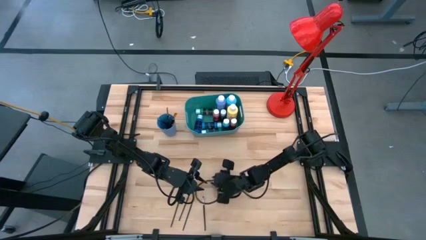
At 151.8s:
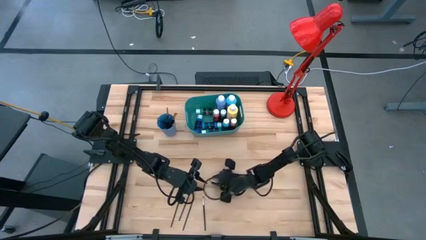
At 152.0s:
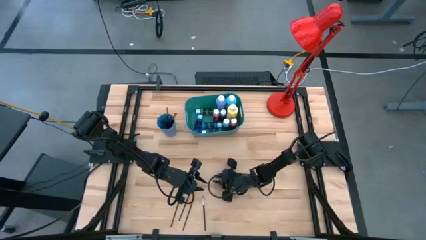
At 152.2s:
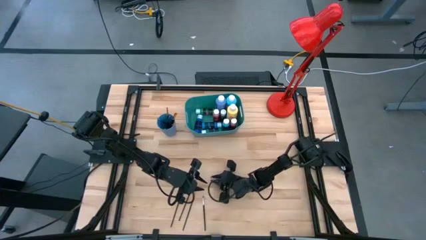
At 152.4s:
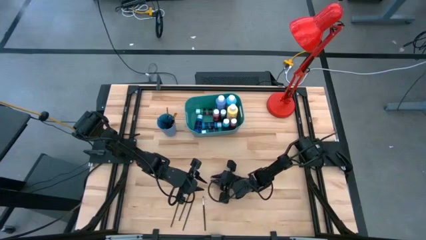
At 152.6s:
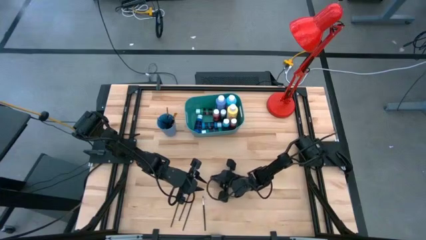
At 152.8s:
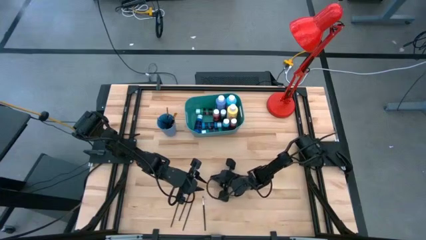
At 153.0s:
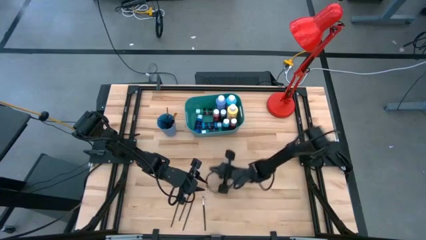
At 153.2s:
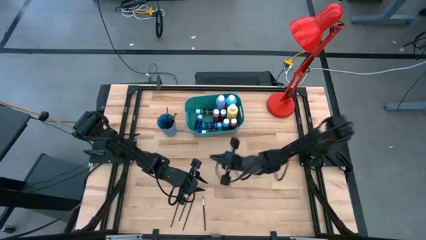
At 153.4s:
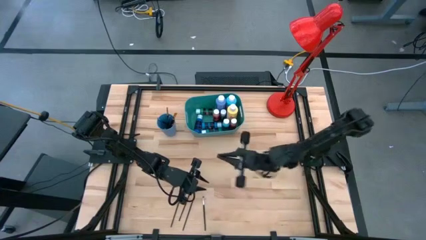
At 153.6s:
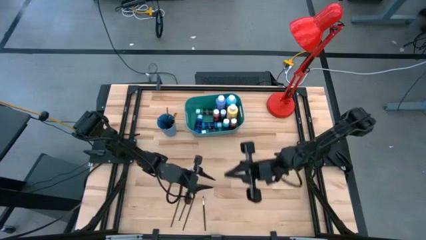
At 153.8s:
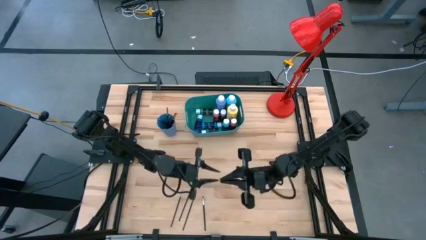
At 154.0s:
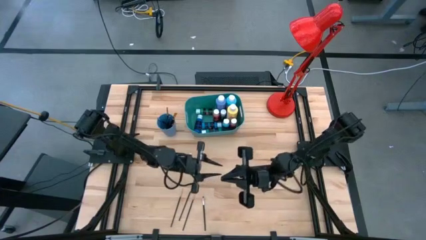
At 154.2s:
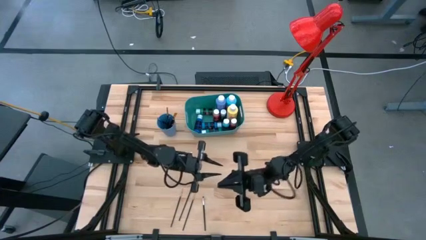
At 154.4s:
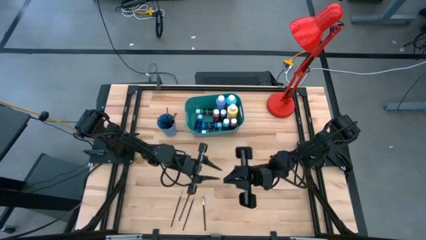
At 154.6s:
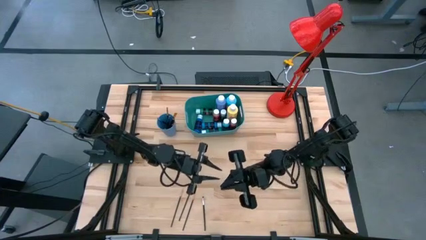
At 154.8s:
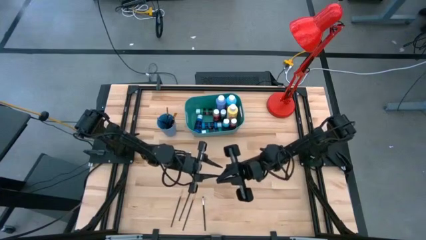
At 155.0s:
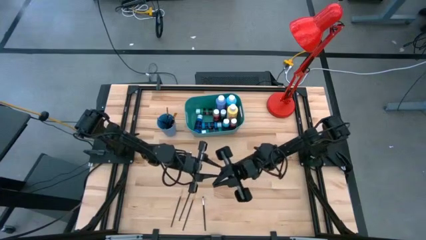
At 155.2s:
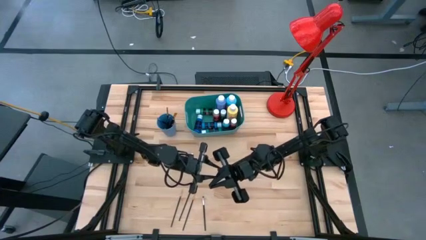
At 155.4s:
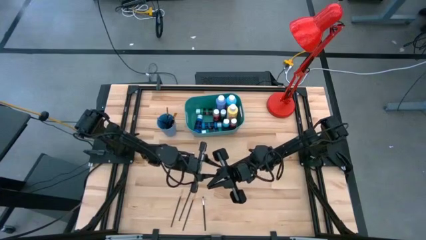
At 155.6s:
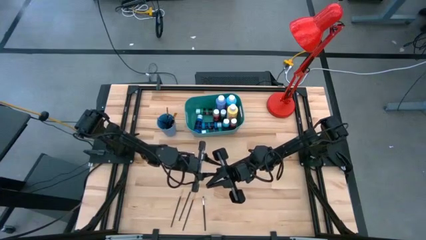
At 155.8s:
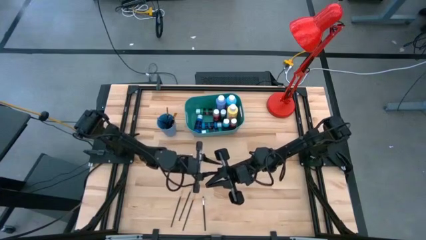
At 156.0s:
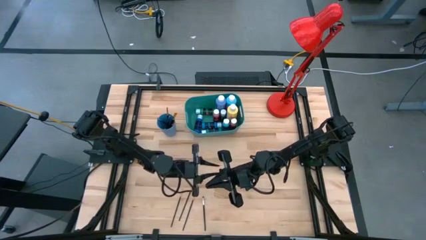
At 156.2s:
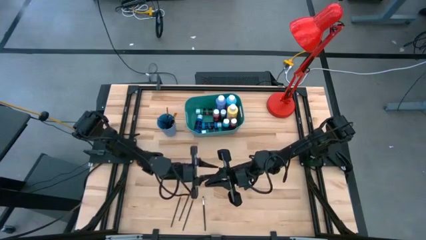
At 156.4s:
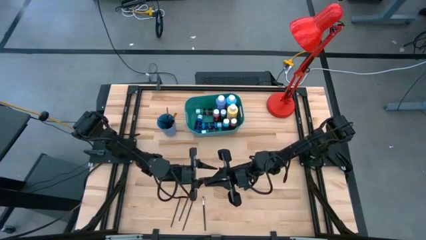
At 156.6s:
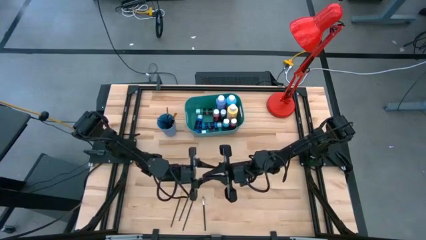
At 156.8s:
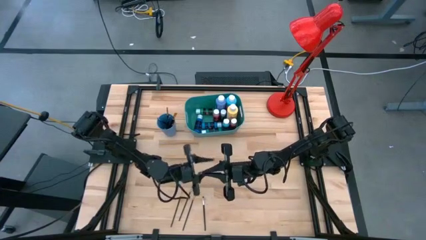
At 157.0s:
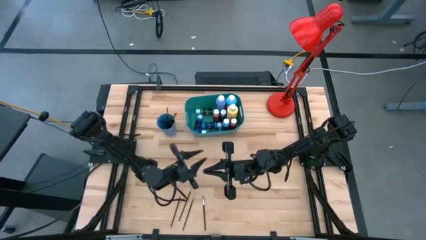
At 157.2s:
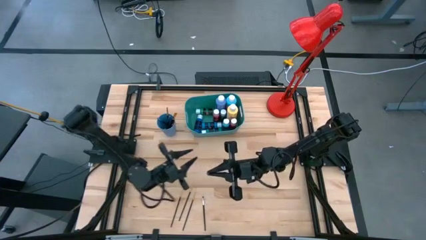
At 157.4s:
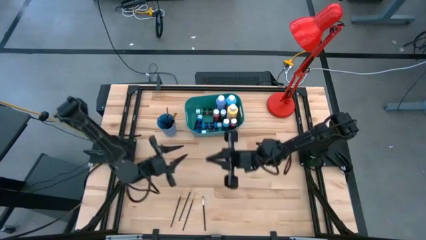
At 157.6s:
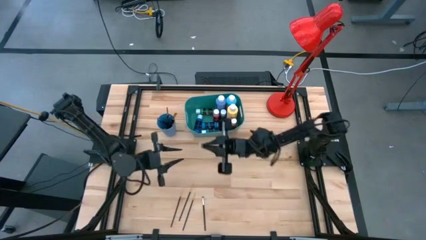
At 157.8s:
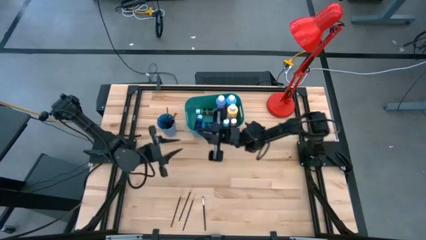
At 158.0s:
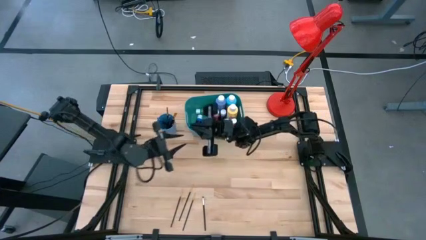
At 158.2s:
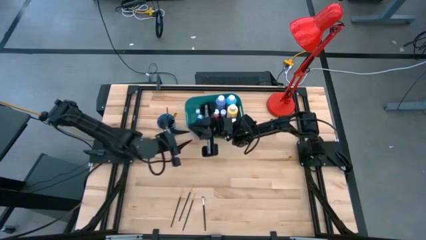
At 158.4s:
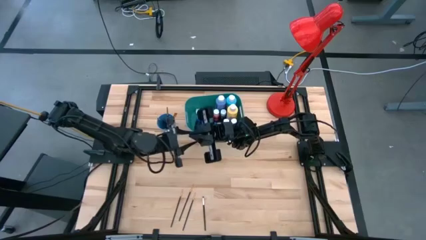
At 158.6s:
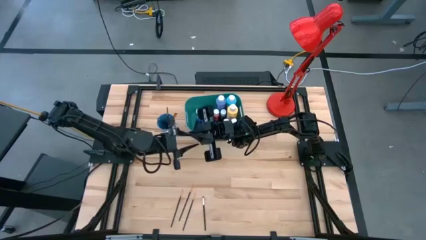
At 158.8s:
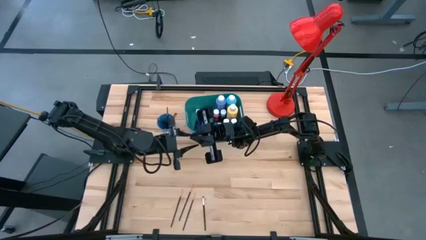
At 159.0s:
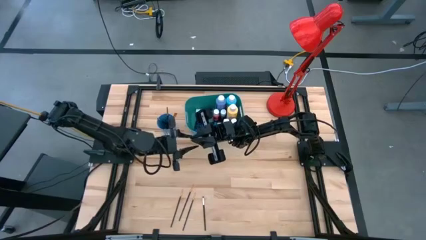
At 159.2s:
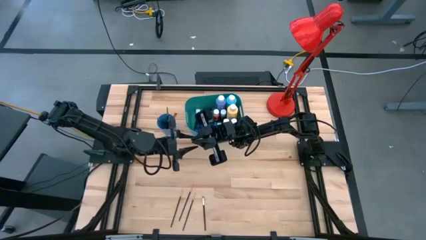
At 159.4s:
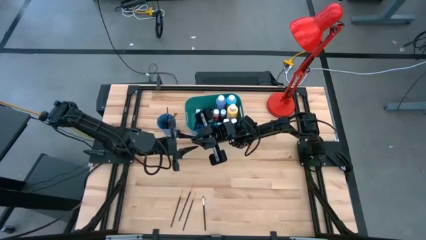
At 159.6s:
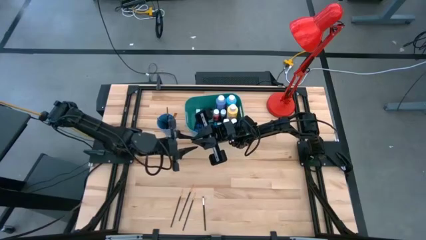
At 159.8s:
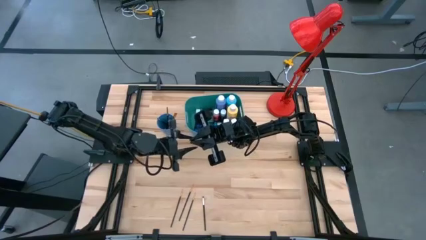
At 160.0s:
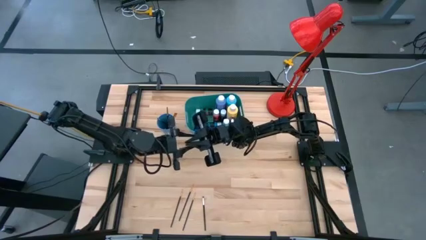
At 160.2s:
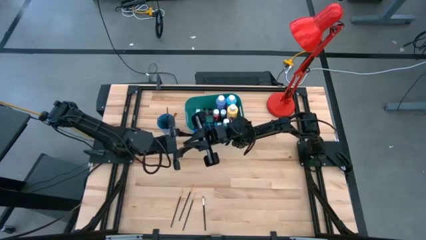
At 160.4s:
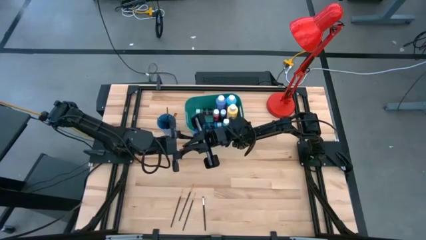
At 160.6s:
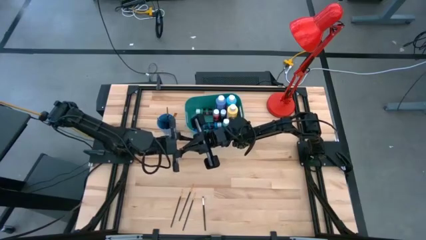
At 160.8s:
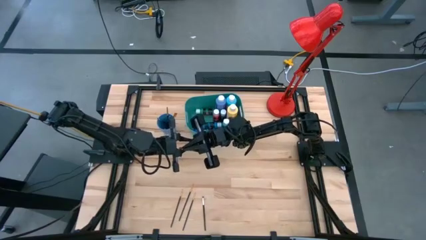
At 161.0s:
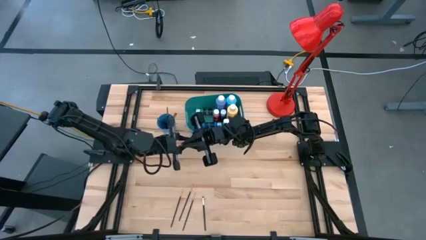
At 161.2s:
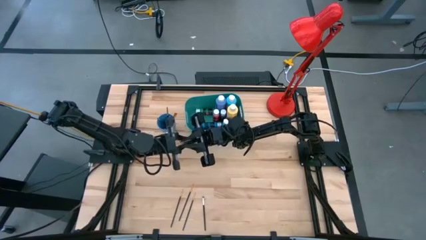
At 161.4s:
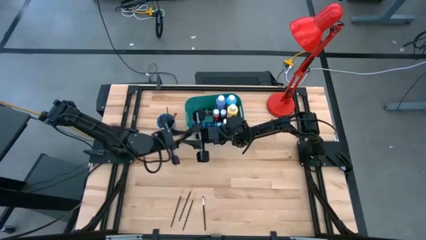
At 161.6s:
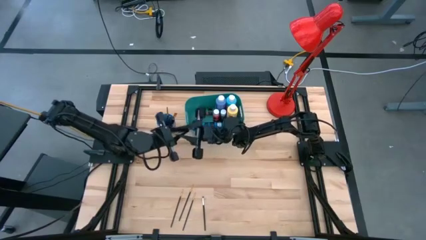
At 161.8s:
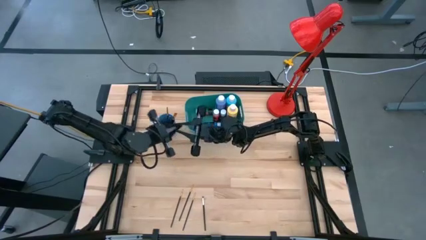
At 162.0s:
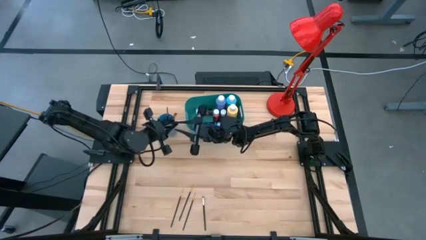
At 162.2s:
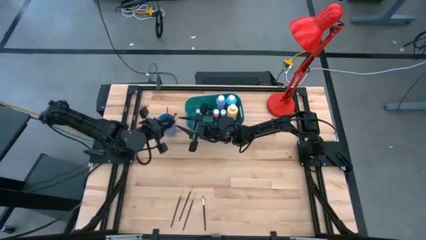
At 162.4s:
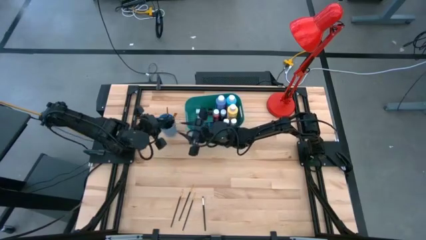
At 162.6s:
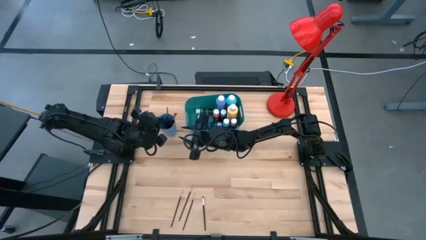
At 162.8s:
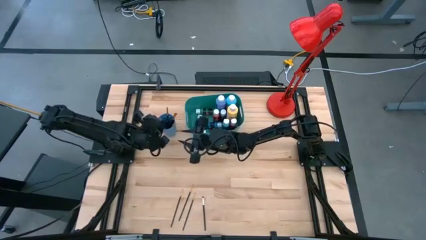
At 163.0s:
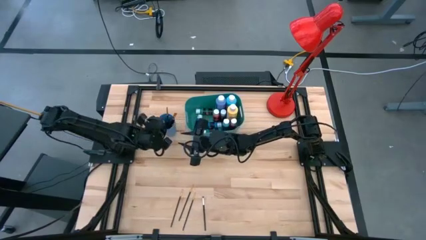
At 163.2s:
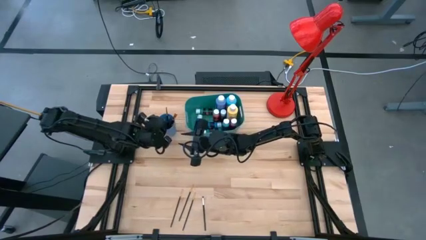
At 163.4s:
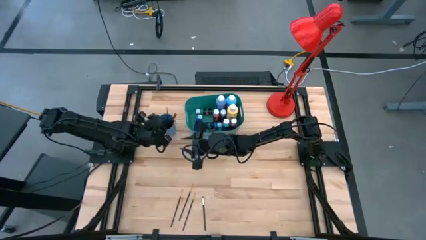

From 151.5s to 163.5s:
Task: Pick & Place Paint Supplies
Put the silver paint brush into the blue cup

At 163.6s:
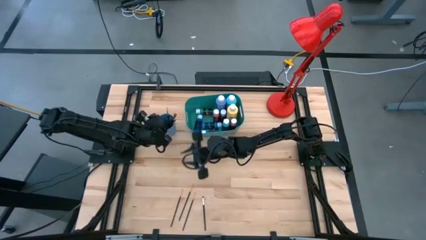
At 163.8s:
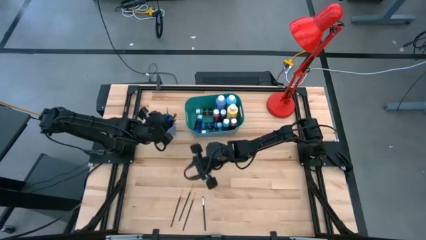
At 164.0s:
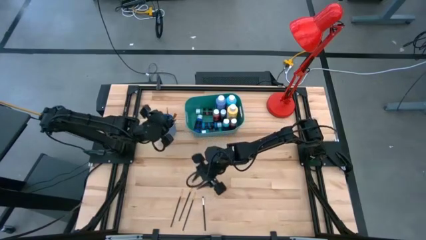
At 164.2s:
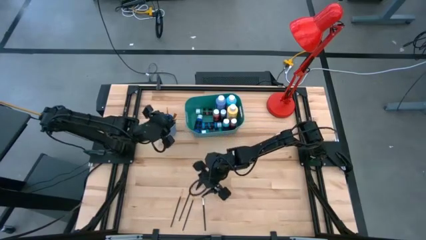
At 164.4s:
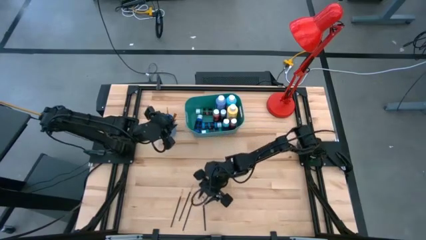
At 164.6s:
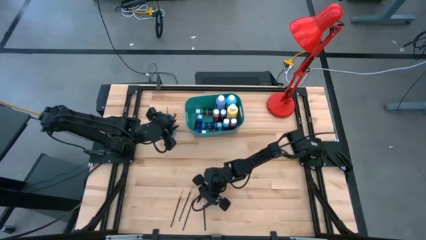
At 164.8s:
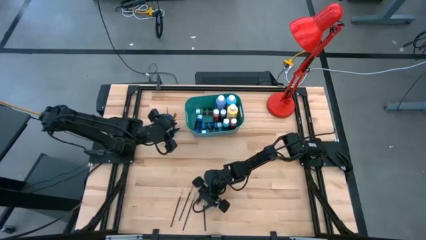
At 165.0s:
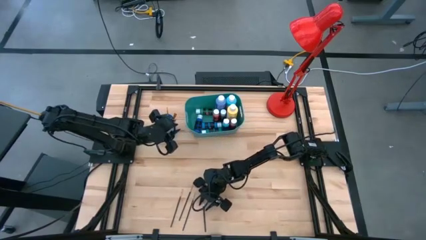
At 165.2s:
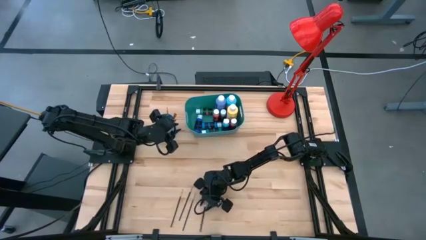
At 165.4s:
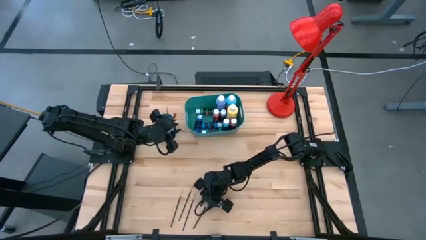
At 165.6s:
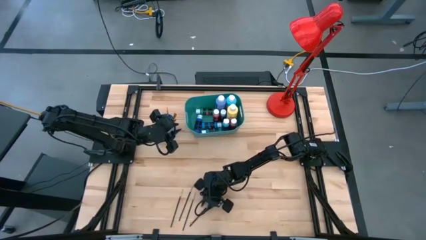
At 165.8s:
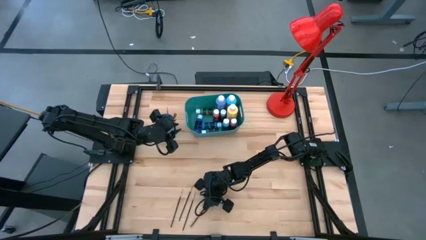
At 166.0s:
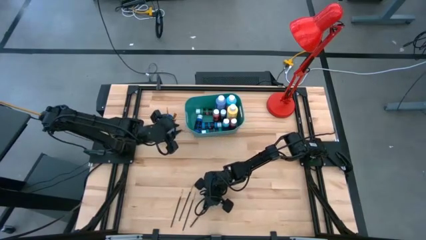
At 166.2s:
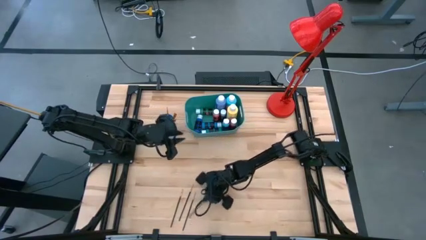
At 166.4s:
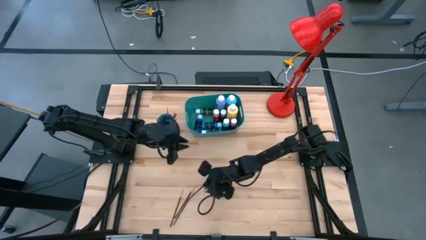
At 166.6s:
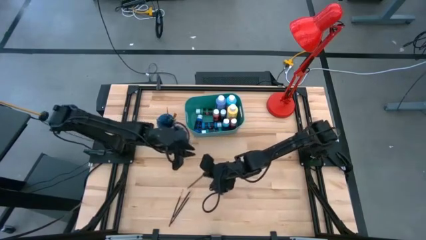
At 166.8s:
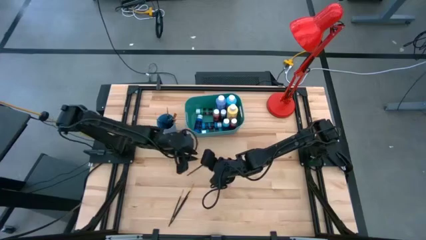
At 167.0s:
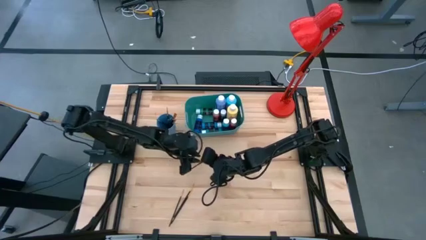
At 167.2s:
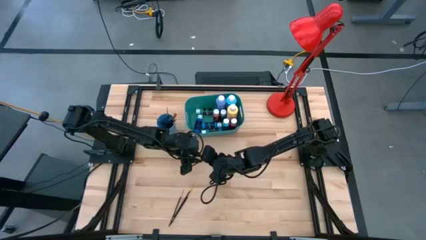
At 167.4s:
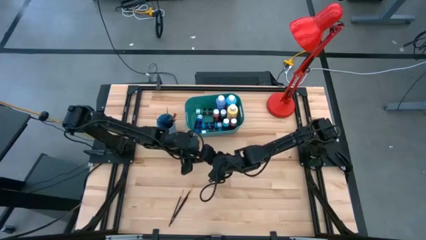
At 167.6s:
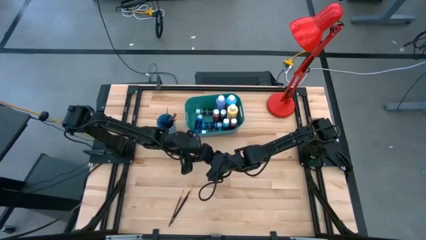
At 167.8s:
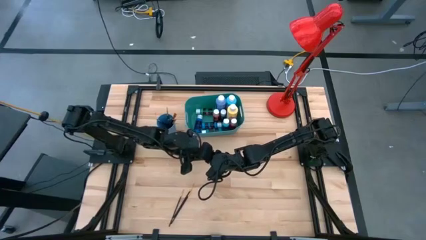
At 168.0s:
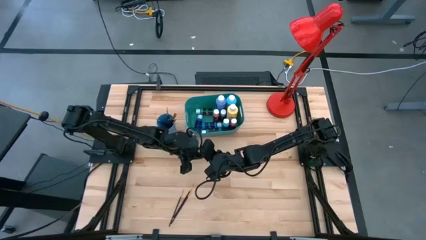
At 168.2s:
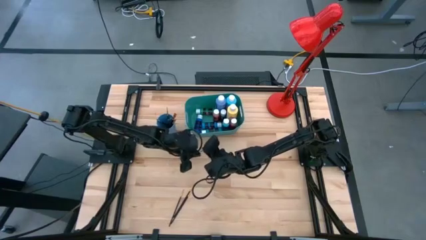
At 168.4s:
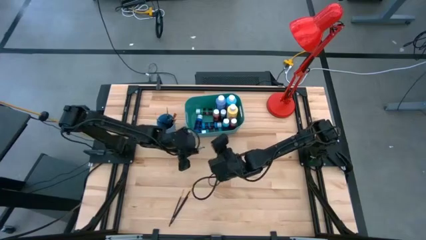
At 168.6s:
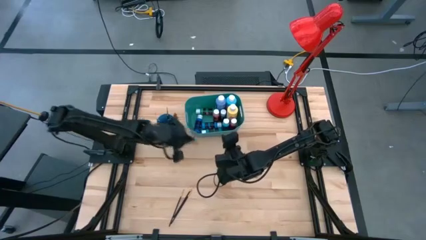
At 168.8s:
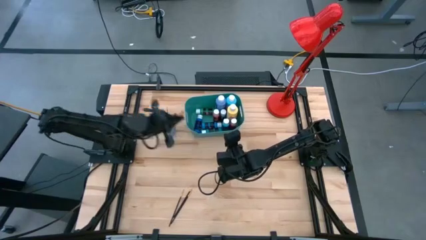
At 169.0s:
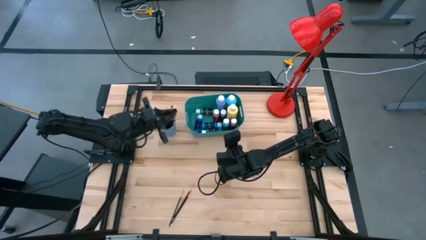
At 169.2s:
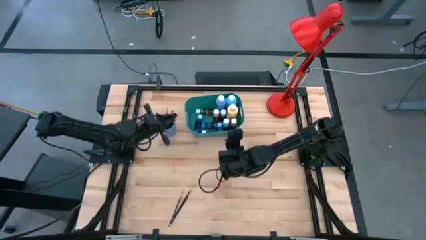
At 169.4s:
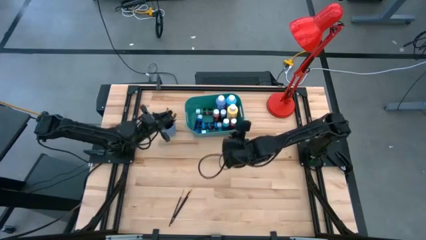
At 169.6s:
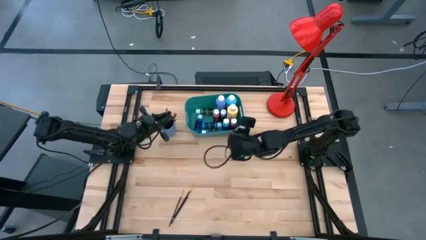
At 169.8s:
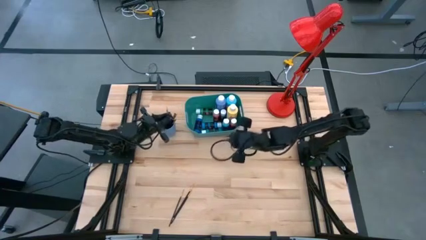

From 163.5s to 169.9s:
Put the silver paint brush into the blue cup
